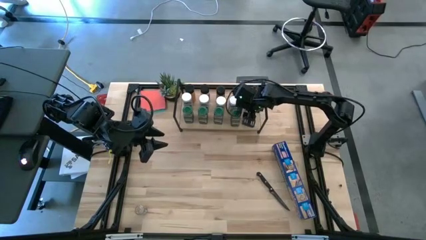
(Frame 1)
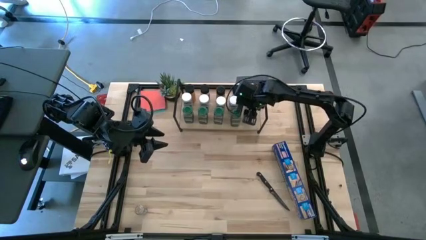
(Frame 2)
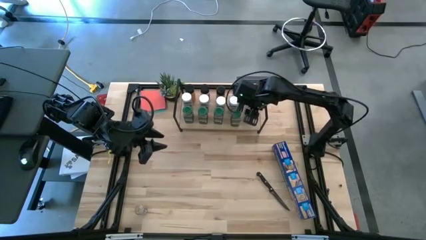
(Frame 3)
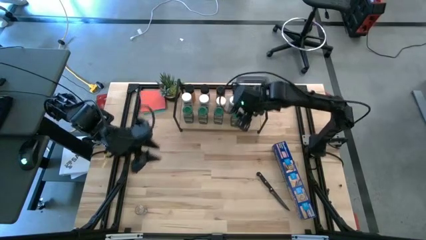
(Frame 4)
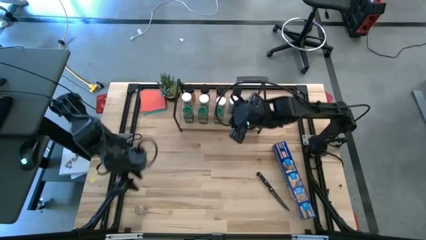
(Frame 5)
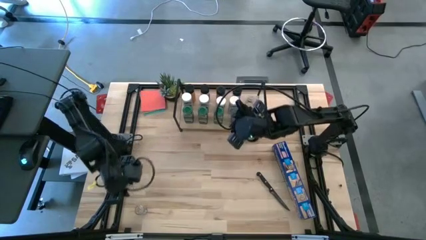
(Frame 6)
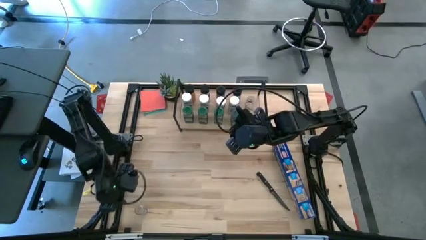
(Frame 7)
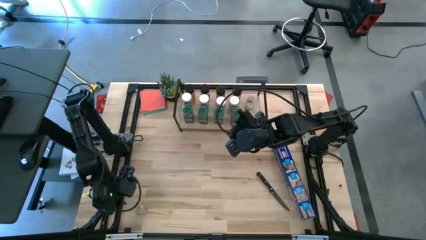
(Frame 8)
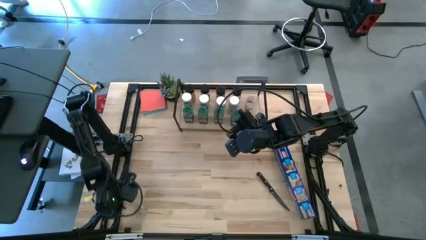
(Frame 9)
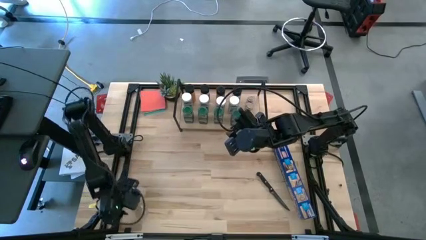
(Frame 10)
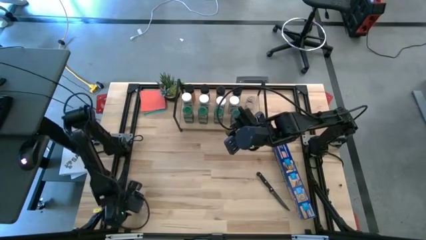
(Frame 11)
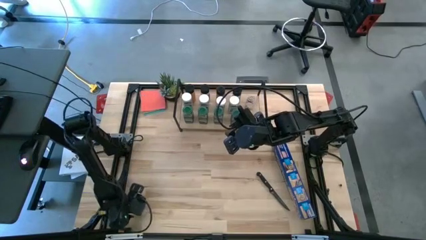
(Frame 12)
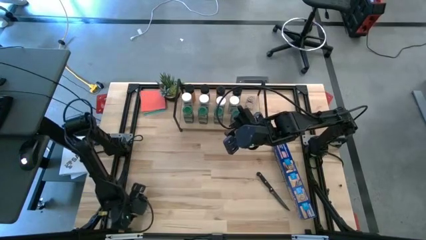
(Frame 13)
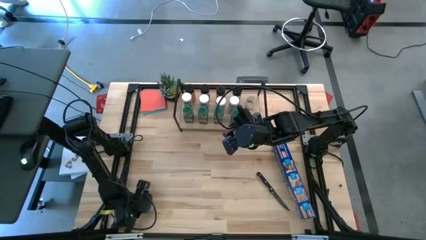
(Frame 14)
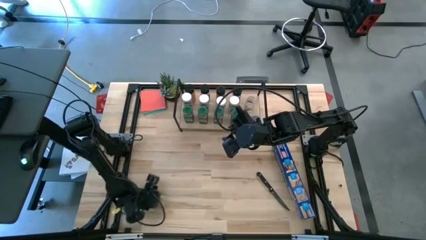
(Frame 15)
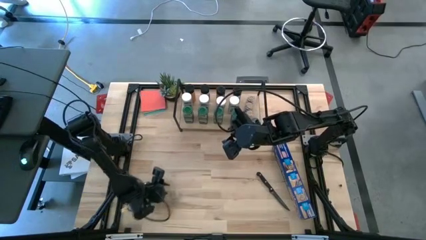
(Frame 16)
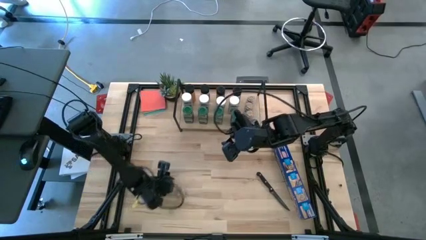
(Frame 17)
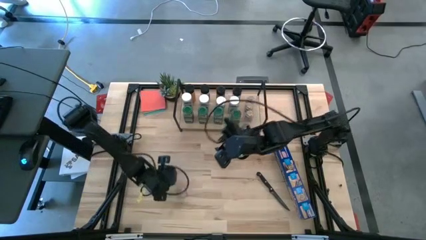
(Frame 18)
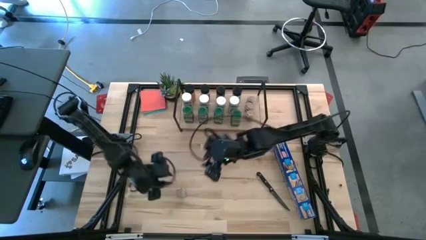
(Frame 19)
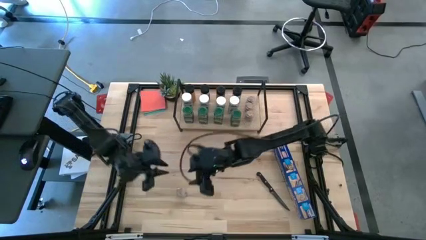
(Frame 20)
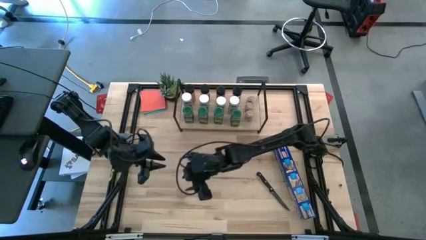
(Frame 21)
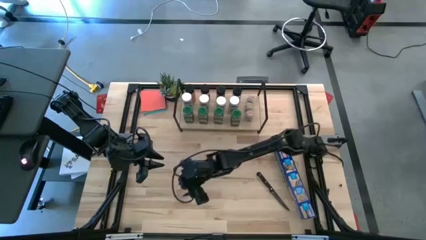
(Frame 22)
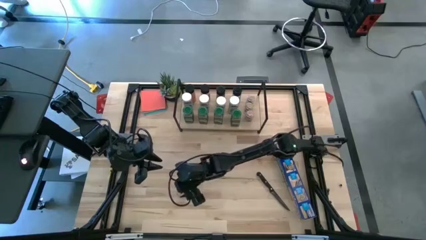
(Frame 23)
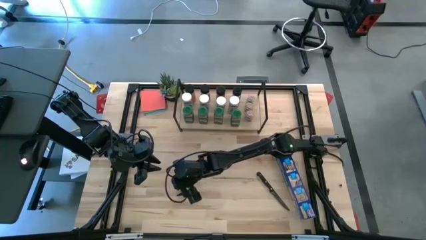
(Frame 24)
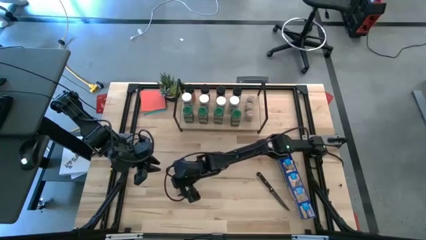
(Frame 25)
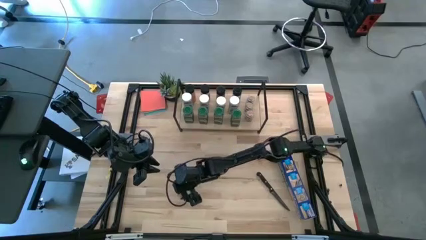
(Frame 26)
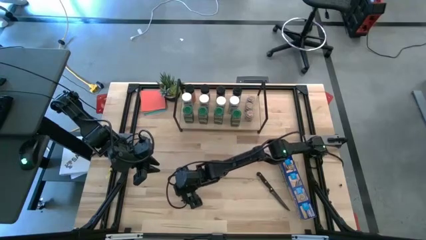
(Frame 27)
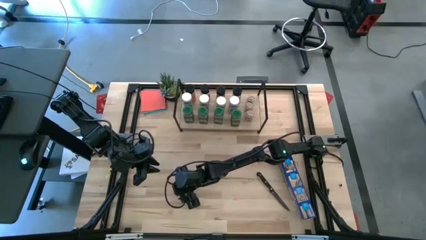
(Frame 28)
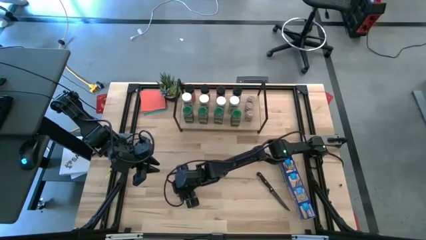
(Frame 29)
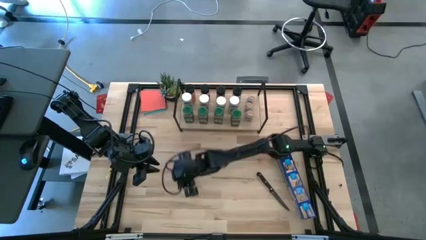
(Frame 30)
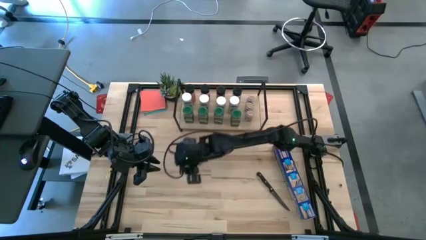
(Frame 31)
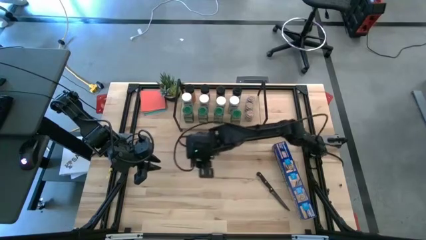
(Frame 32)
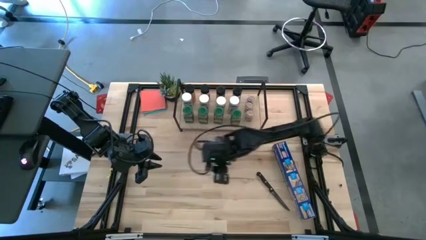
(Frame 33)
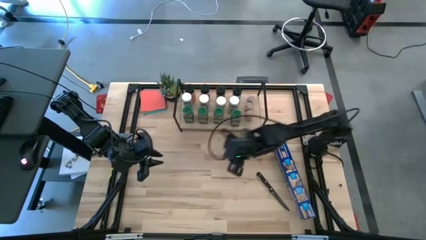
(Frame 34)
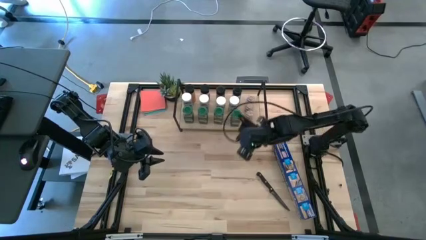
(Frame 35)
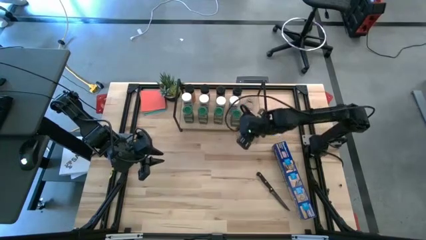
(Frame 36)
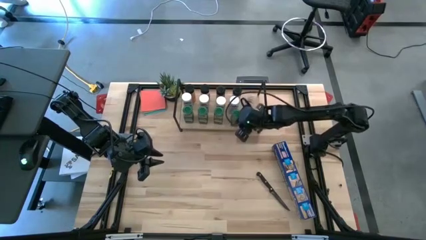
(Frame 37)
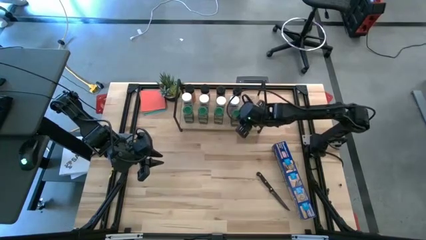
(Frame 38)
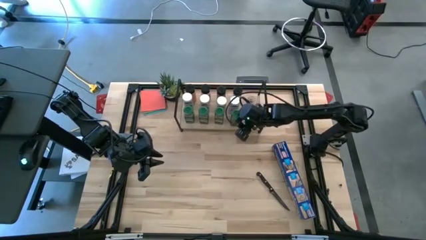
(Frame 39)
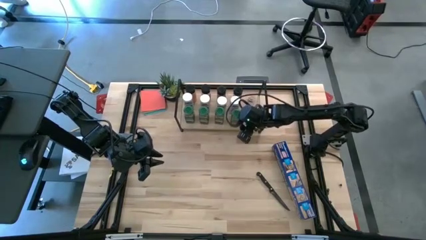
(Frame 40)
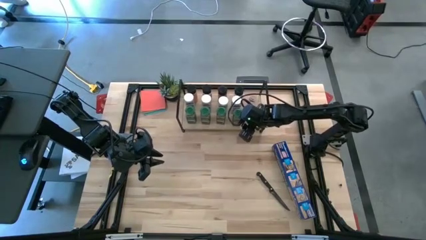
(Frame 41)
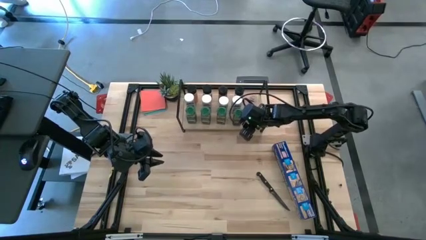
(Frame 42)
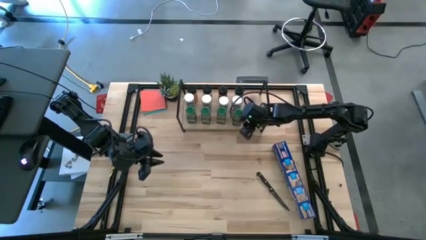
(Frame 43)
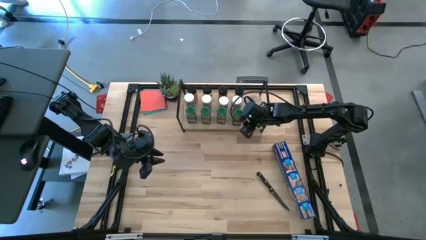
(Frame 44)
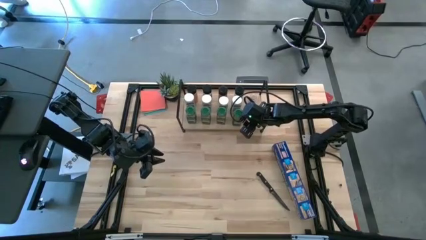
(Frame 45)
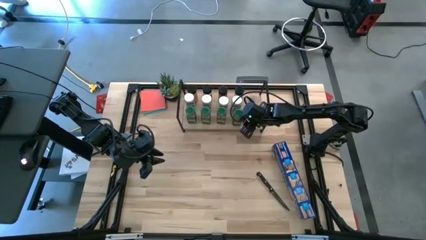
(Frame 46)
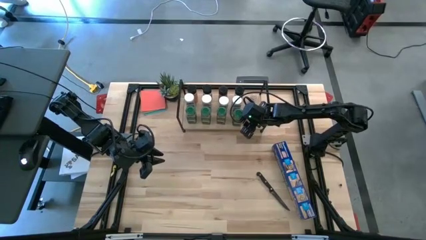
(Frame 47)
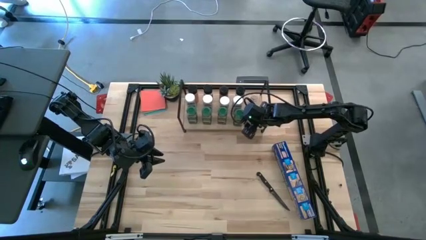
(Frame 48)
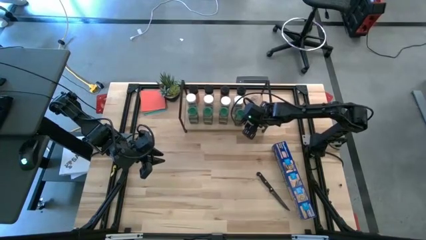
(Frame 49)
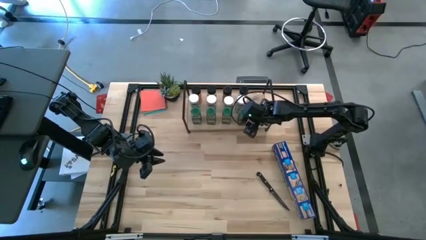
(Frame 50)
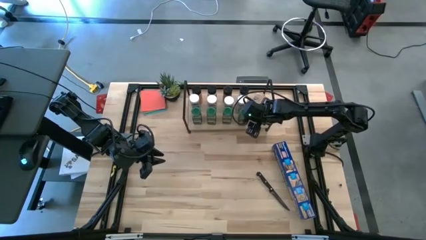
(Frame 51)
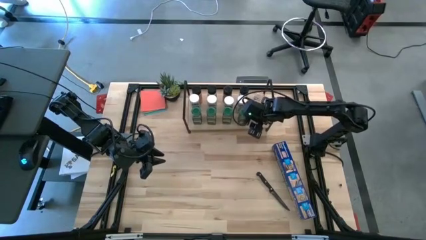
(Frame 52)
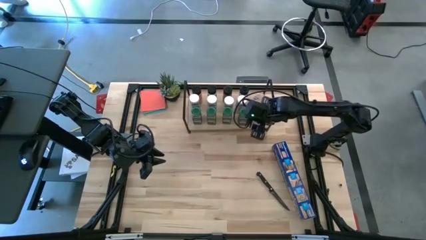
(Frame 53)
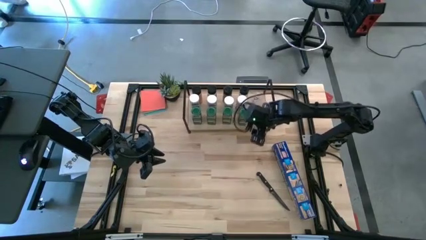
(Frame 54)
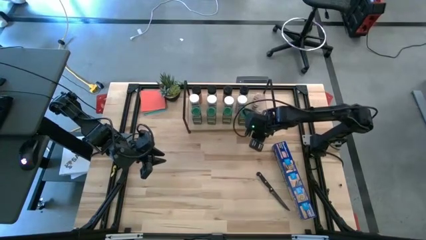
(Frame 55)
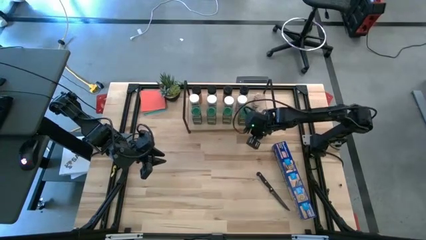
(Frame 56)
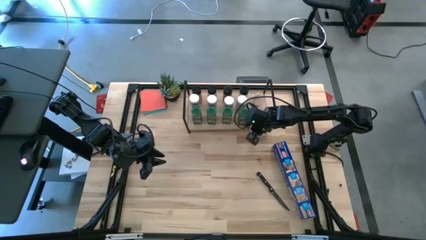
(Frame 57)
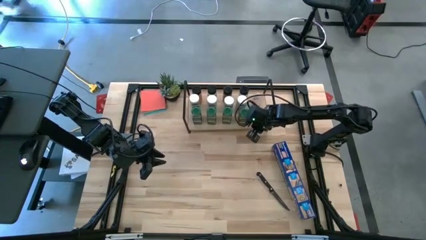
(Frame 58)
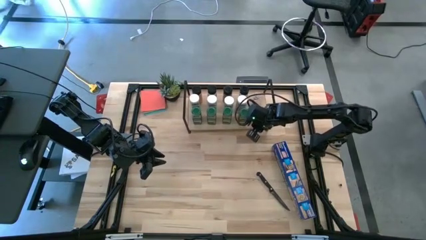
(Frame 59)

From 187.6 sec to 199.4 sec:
Task: Shelf spices
Put the transparent seasoning bottle on the shelf aligned with the other transparent seasoning bottle

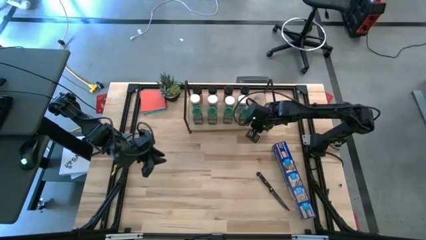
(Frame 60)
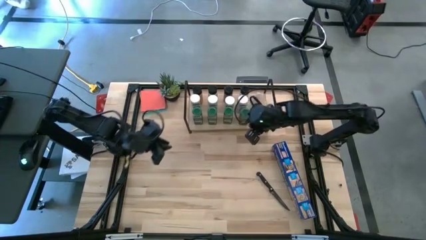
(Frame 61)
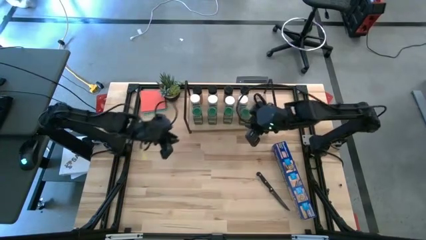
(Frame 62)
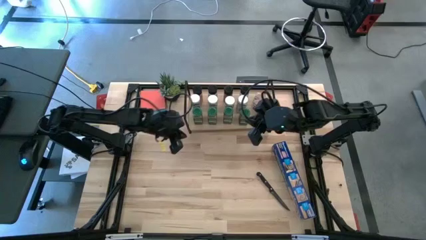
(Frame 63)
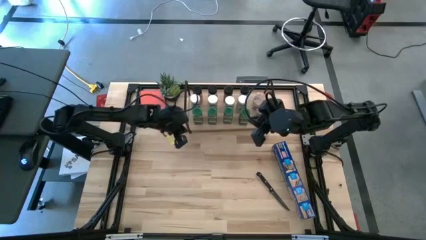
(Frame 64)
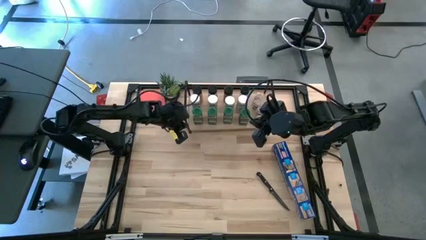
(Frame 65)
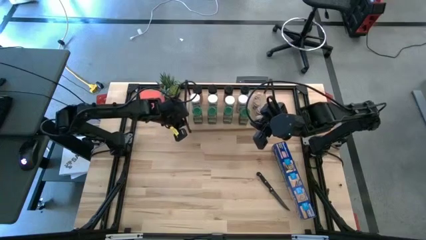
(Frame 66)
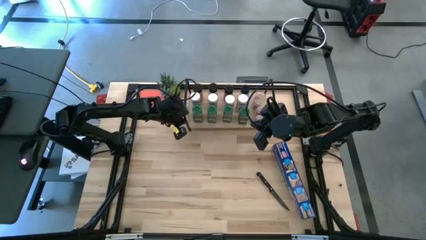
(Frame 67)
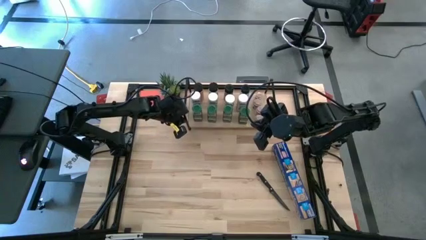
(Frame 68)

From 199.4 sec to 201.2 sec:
Adjust the shelf

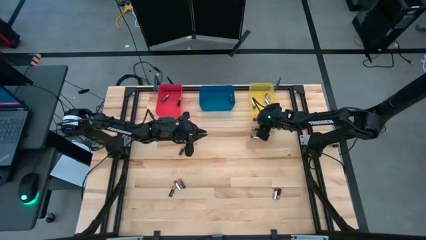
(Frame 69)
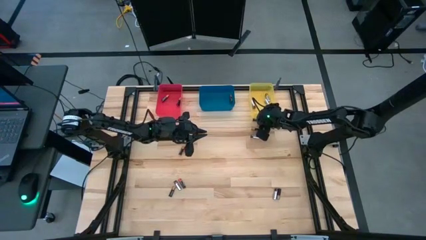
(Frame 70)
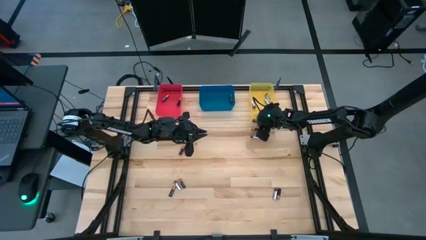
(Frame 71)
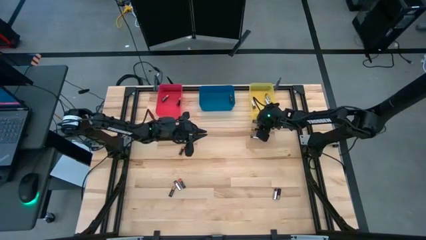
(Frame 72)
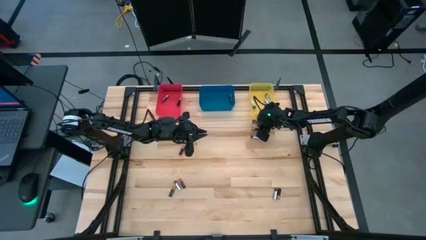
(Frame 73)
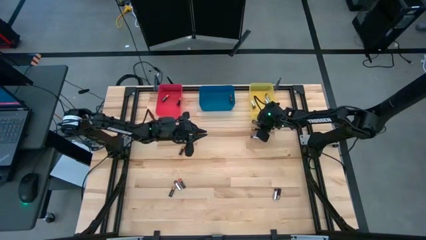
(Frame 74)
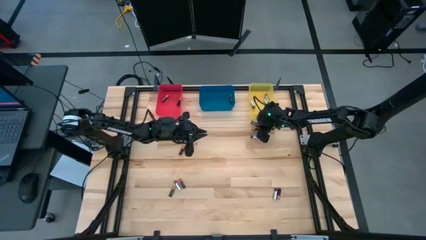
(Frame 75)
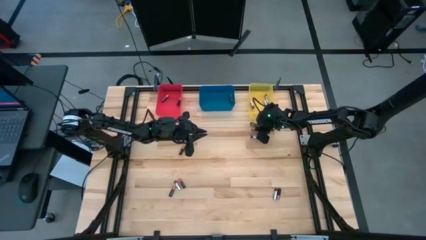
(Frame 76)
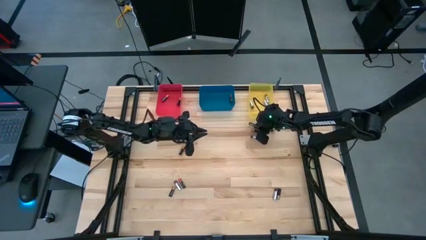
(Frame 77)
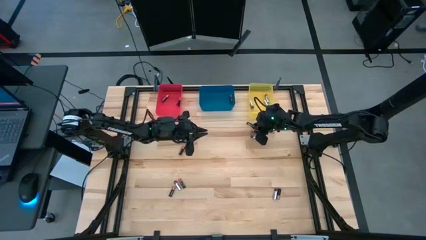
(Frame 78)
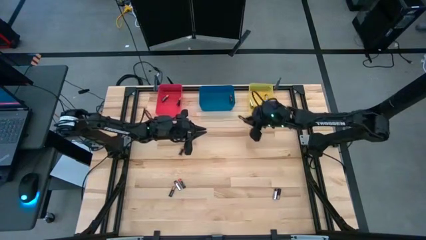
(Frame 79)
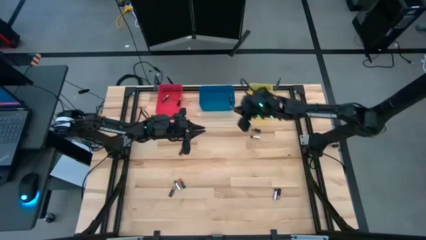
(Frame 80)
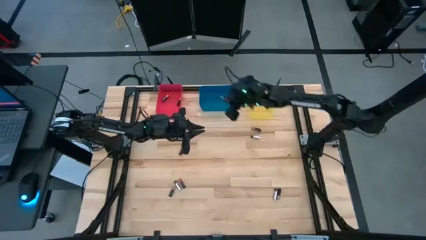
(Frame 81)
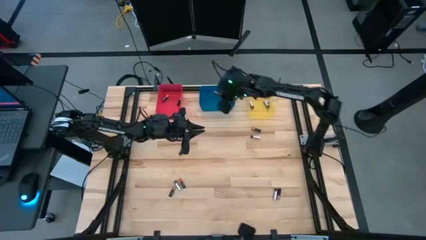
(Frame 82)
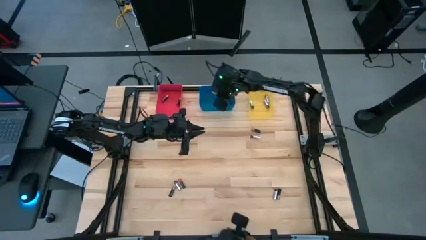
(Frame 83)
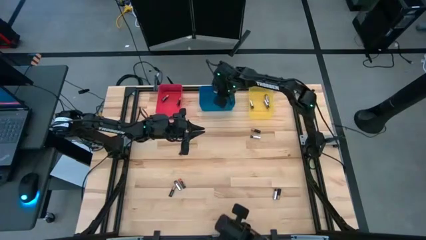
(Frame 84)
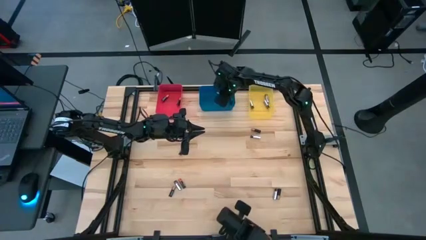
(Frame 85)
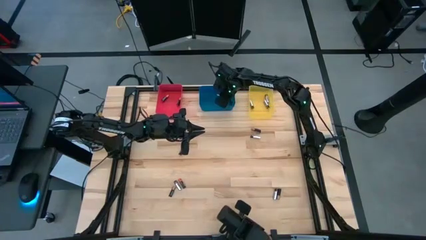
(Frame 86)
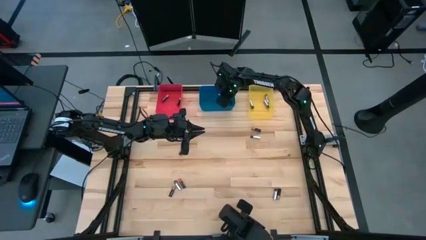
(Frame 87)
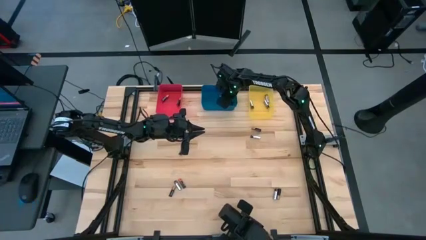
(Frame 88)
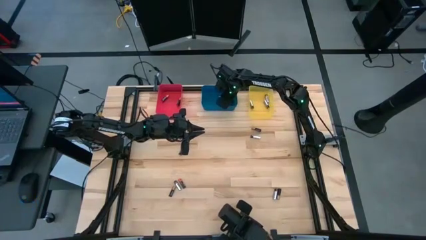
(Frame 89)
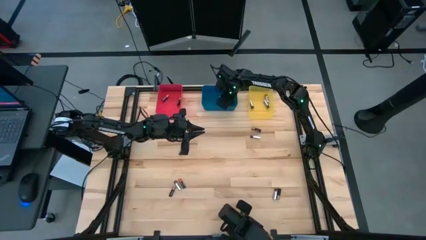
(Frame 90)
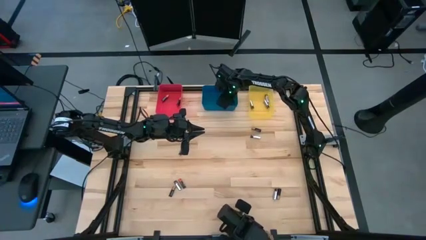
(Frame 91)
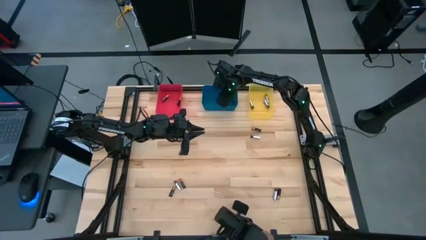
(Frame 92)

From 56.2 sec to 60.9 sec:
Task: Sort batteries
Put the orange battery into the blue bin
